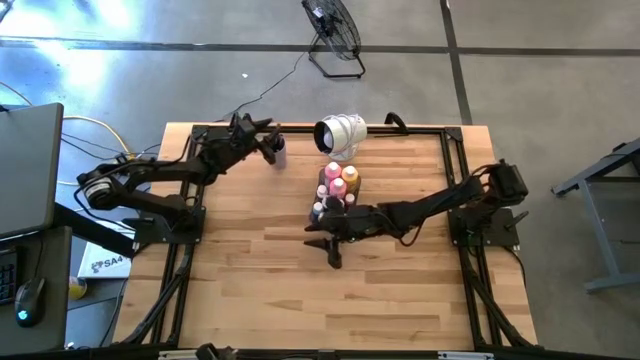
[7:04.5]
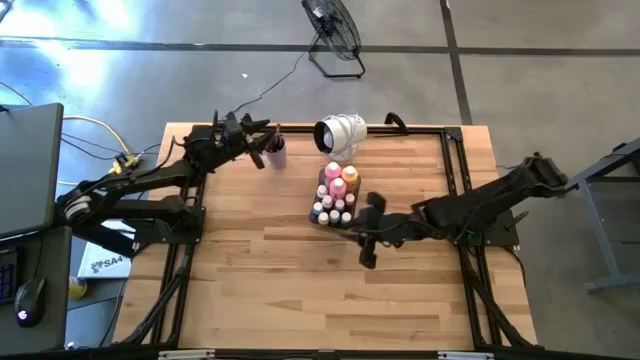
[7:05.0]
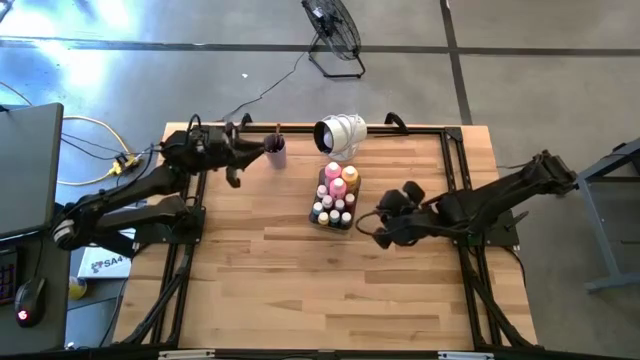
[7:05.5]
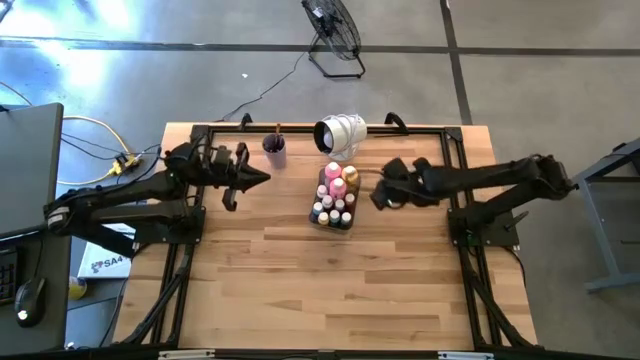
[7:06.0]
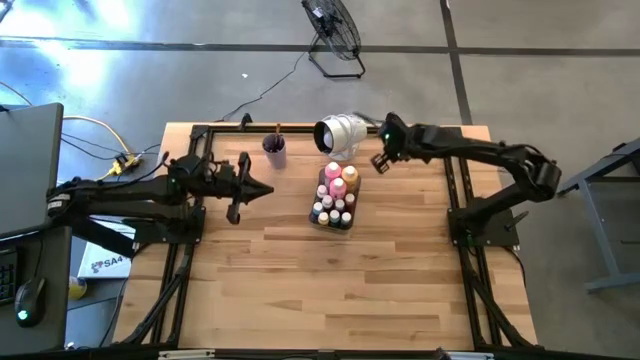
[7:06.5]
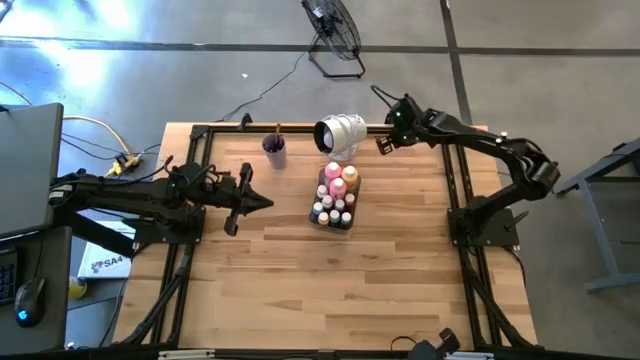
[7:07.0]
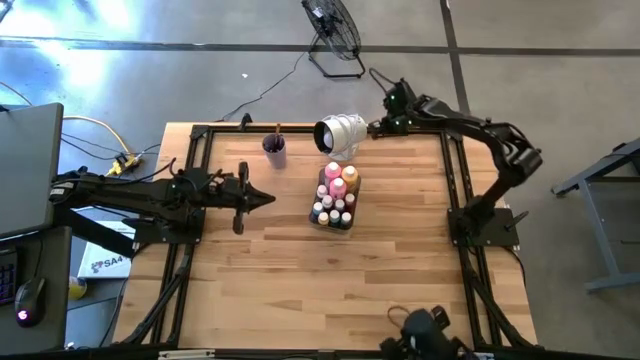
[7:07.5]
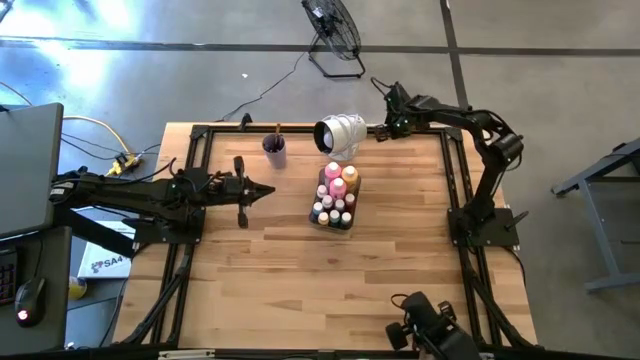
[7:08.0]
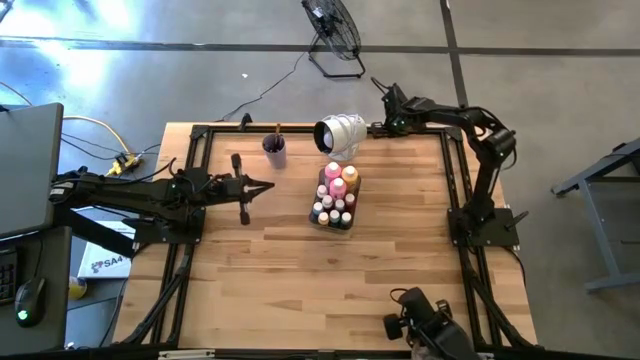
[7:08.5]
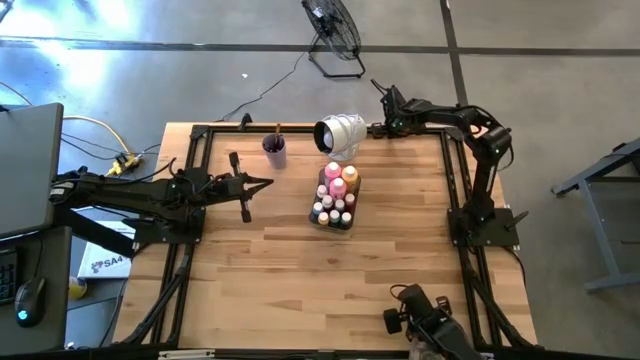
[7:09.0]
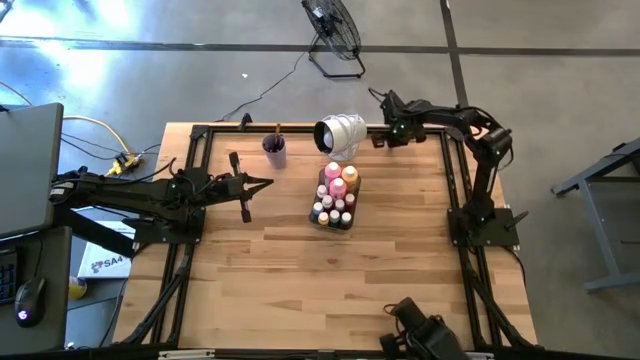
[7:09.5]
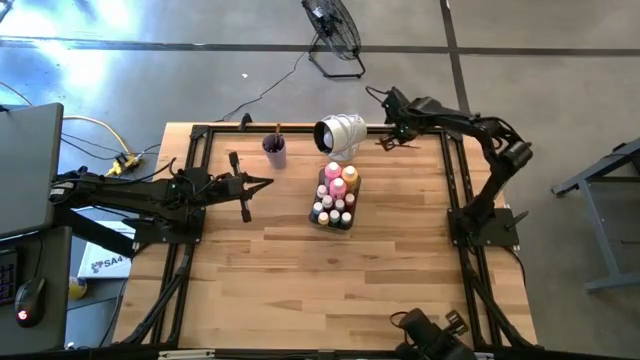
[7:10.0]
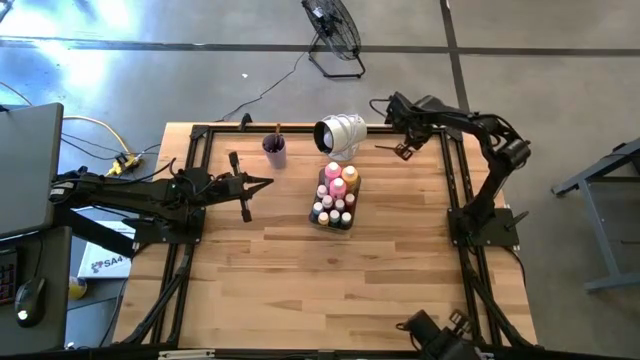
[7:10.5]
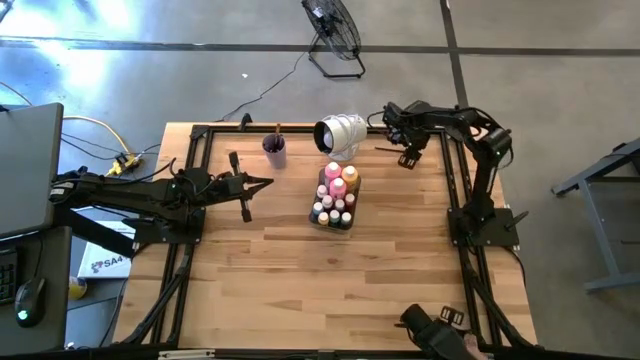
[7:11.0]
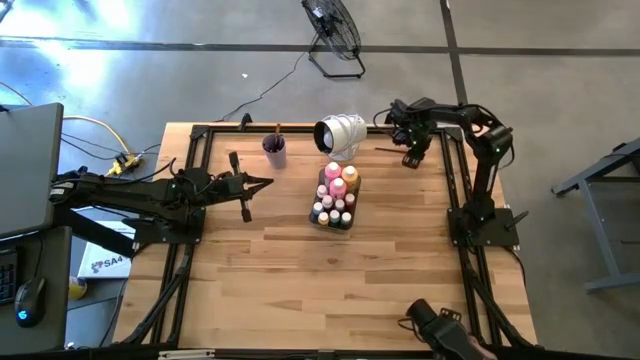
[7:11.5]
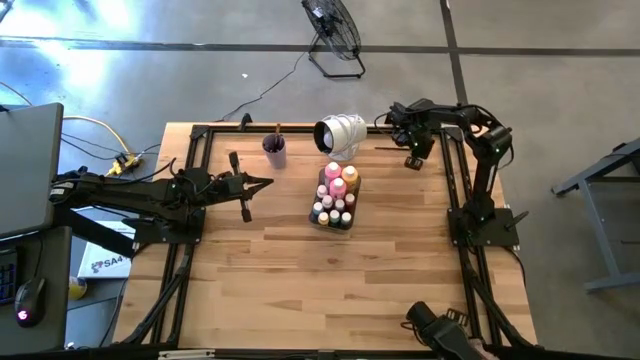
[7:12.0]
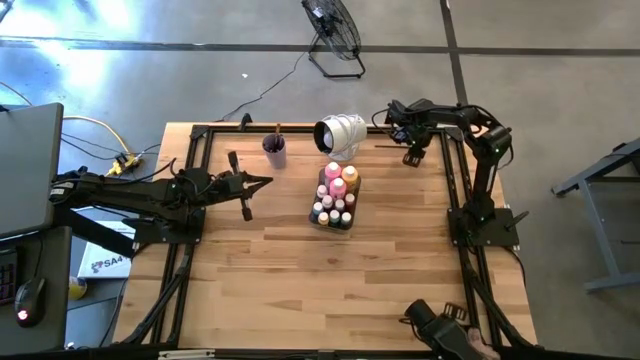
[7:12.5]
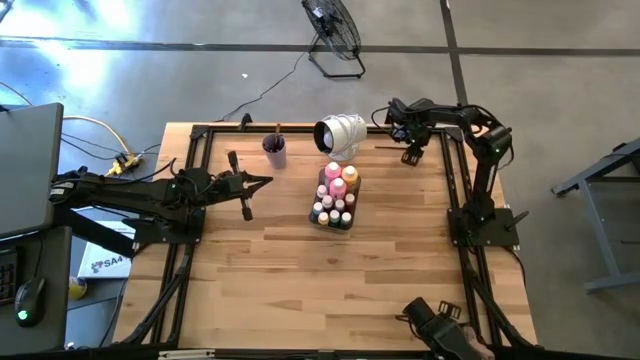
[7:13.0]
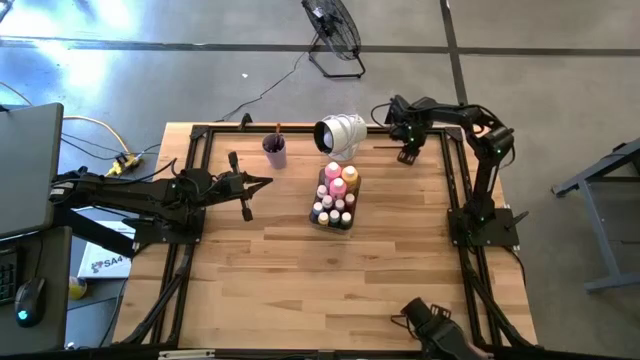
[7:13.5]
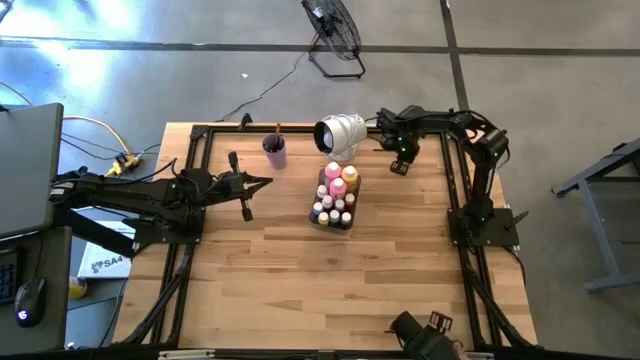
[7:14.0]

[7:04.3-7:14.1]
Task: Pick & Place Paint Supplies
Put the gold paint brush into the violet cup

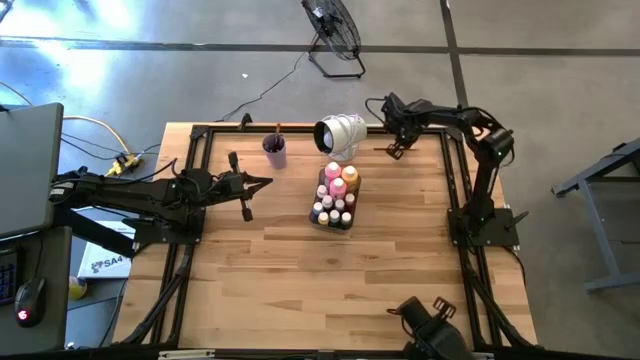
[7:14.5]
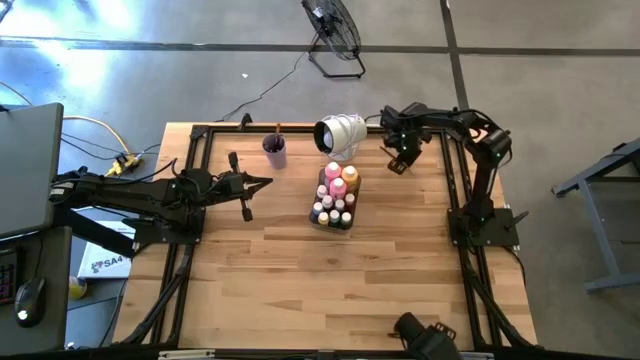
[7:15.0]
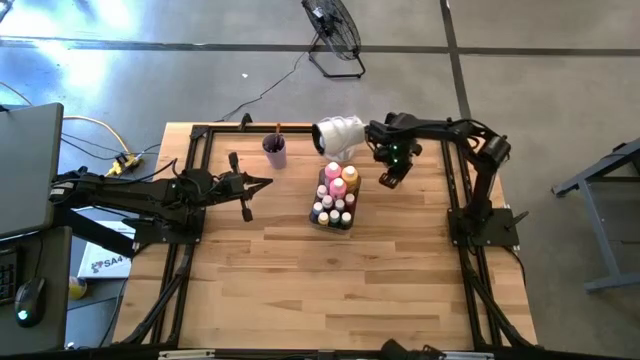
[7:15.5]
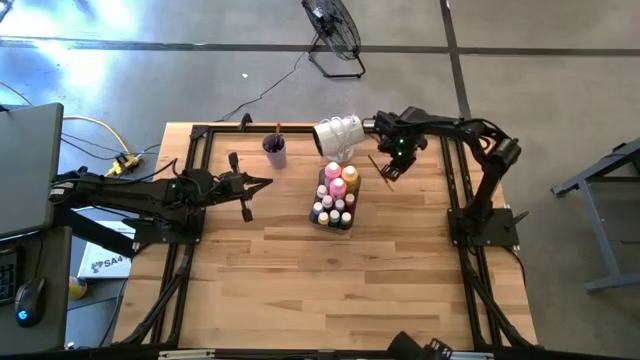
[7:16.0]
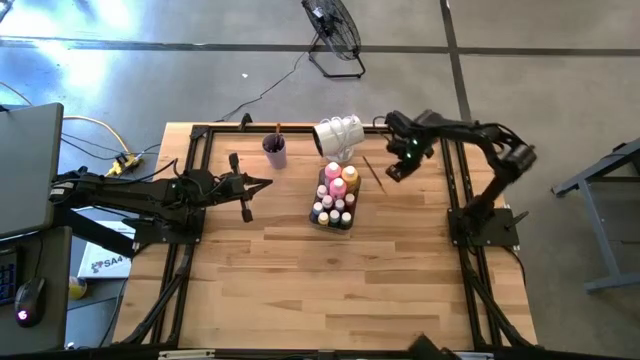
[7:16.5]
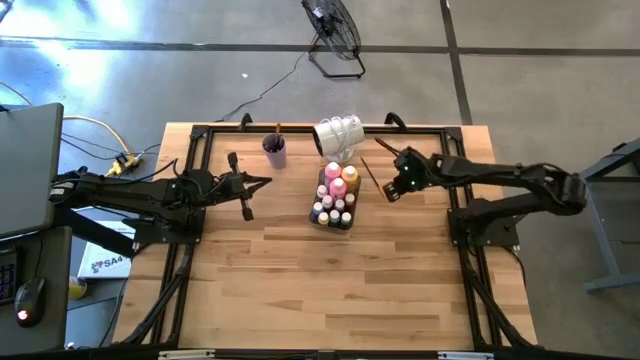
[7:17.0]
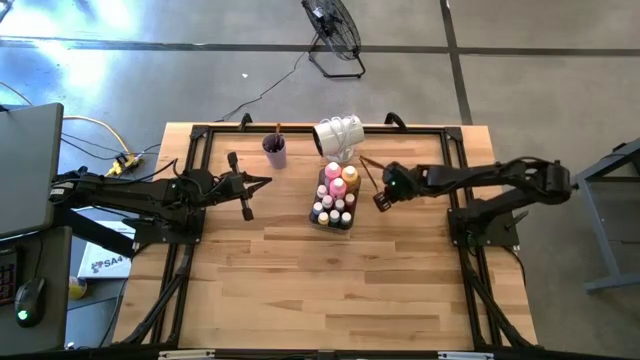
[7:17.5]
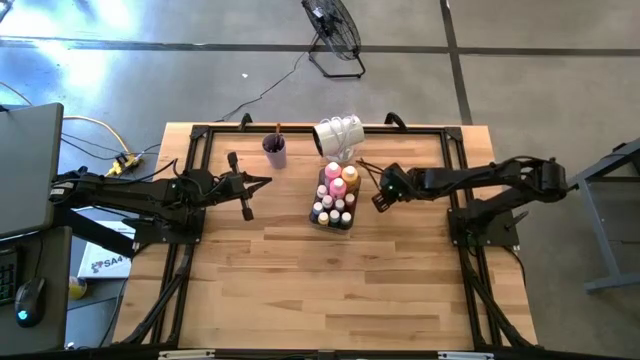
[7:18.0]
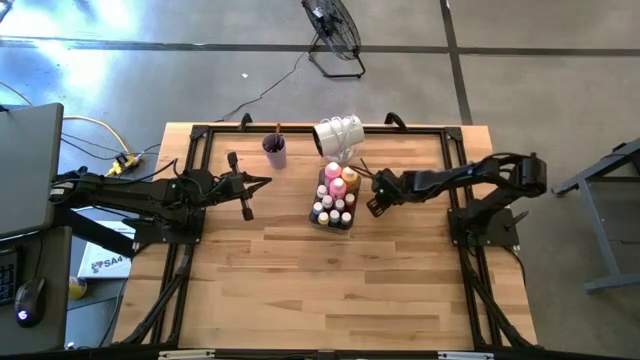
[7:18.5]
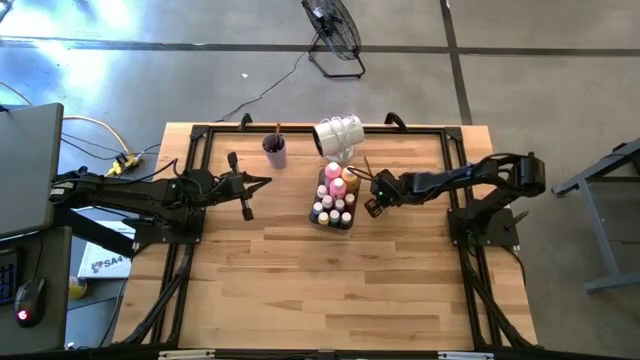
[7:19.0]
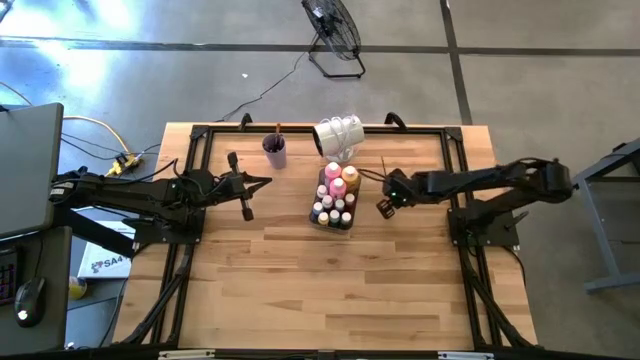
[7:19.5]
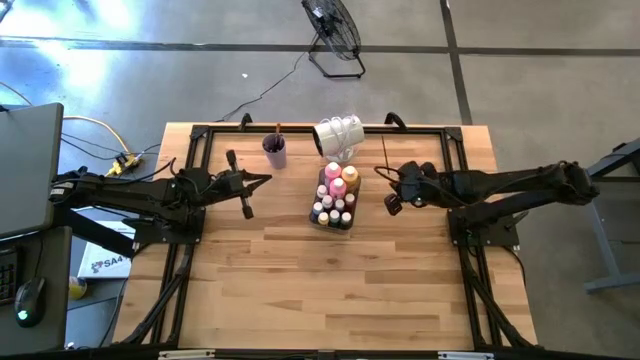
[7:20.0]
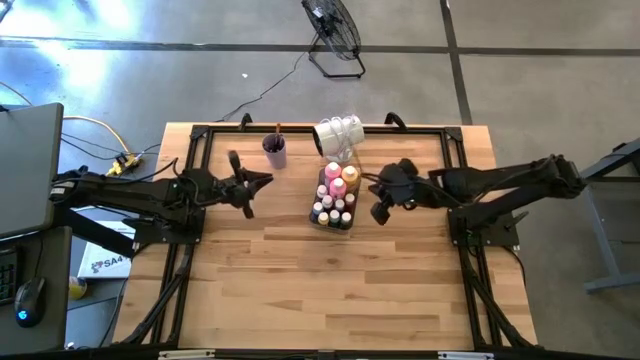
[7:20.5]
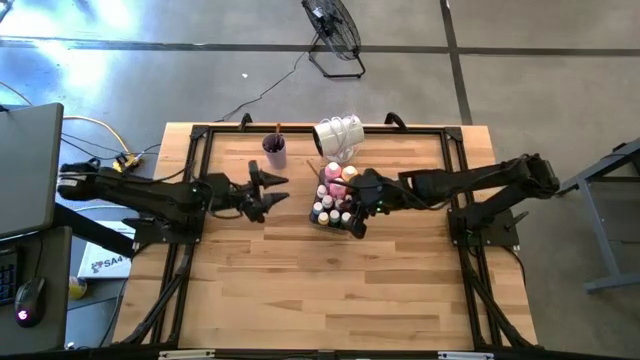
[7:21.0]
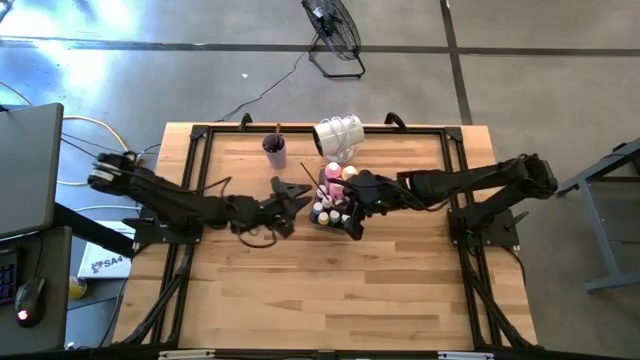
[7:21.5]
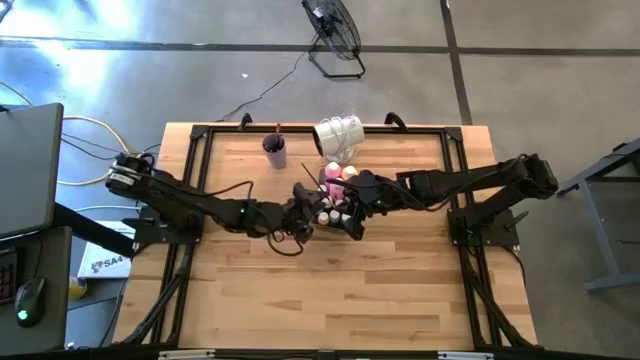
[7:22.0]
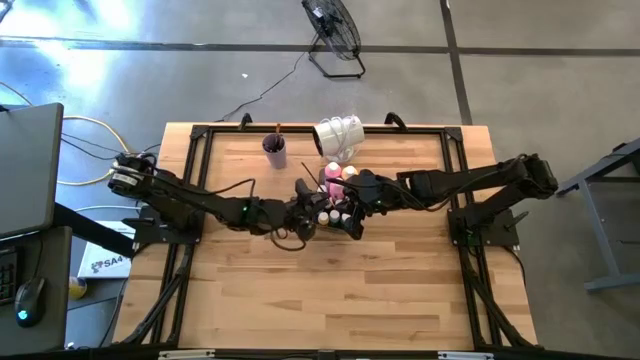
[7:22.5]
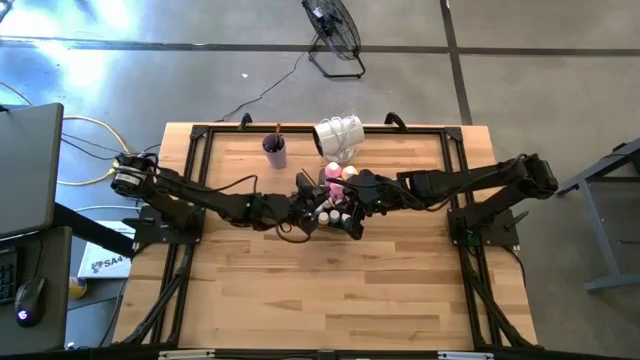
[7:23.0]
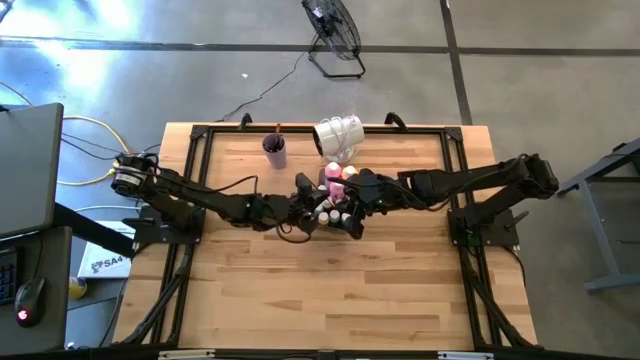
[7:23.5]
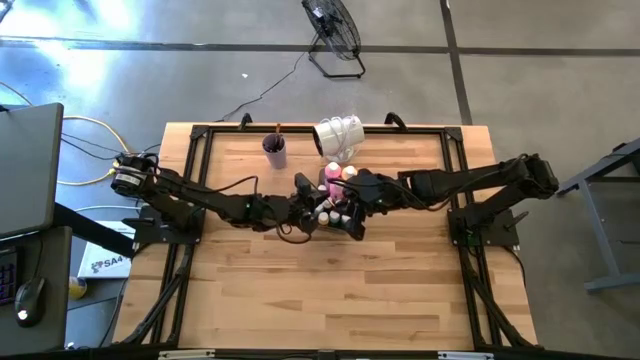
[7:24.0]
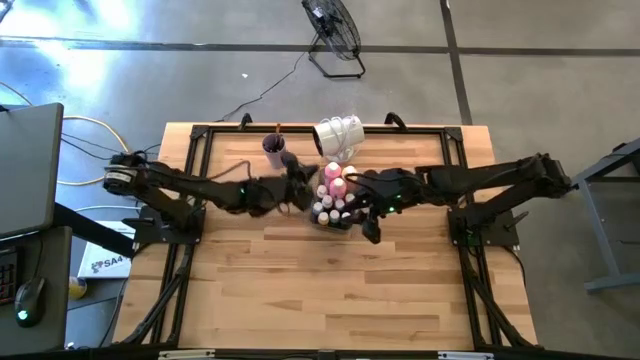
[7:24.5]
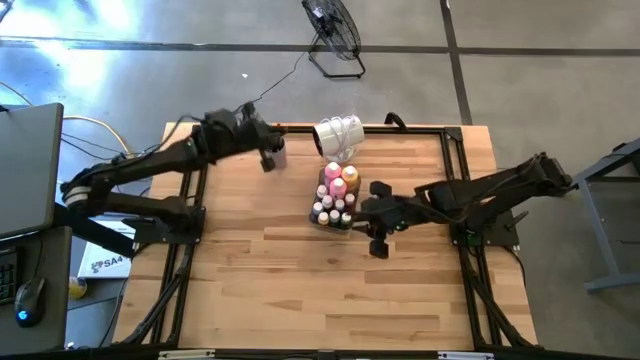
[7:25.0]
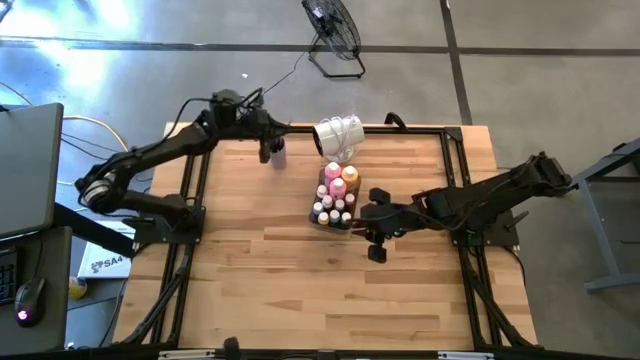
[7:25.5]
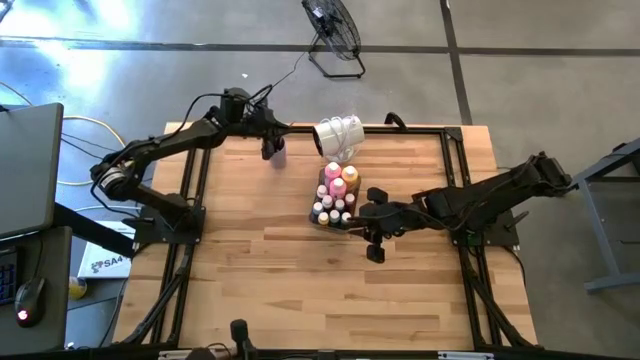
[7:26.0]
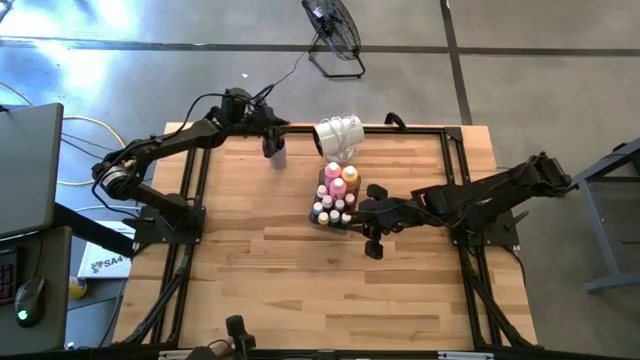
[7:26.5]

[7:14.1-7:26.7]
Put the gold paint brush into the violet cup
